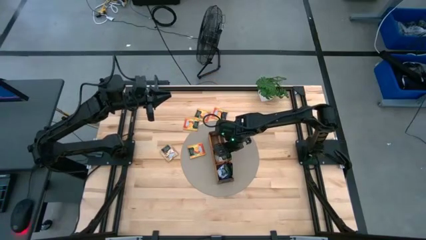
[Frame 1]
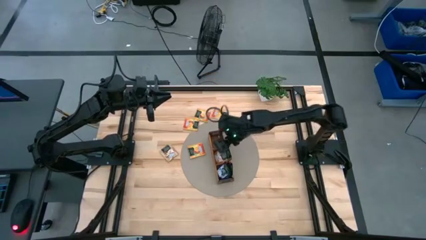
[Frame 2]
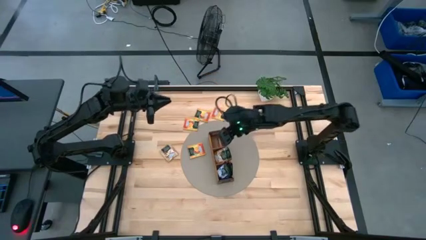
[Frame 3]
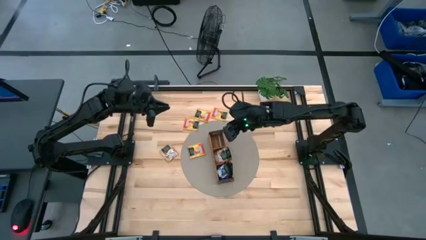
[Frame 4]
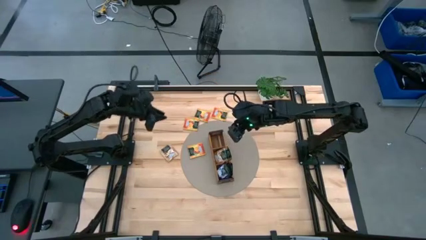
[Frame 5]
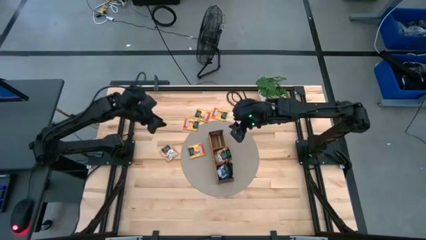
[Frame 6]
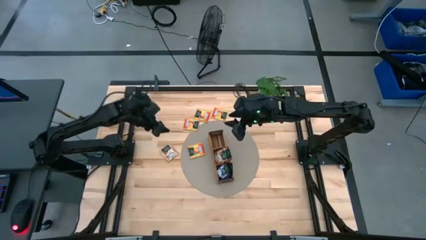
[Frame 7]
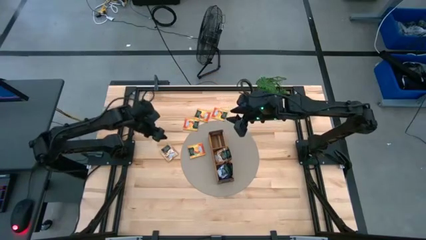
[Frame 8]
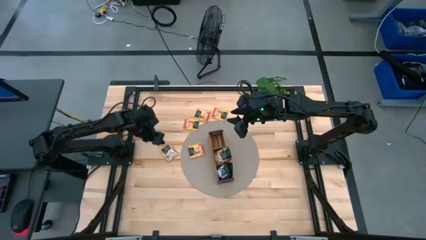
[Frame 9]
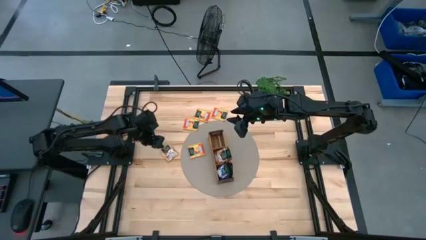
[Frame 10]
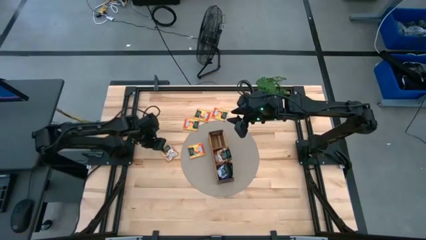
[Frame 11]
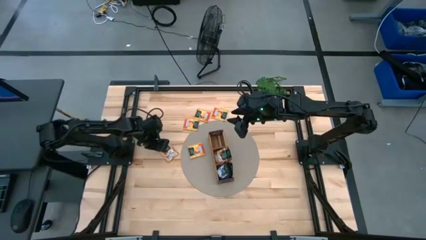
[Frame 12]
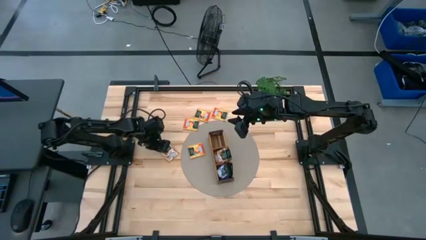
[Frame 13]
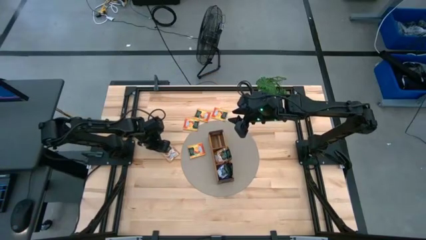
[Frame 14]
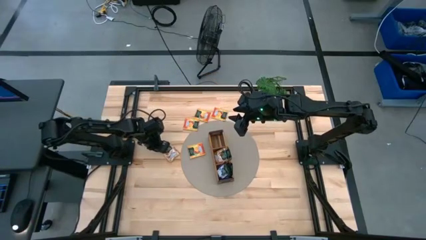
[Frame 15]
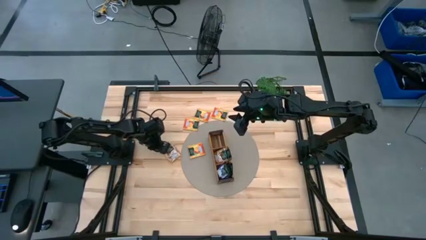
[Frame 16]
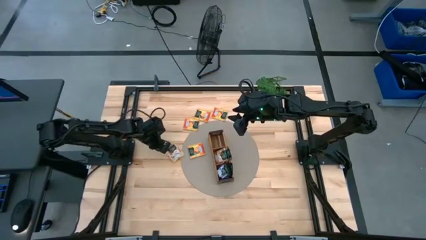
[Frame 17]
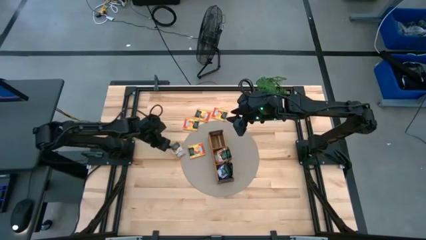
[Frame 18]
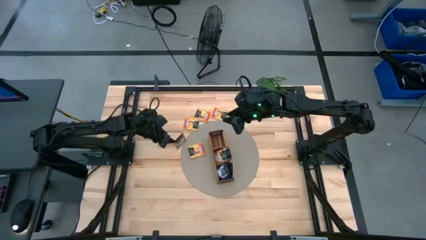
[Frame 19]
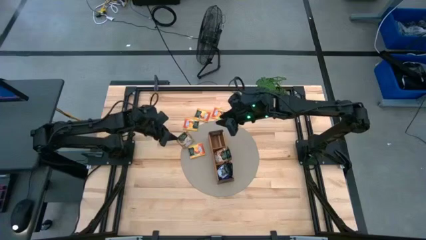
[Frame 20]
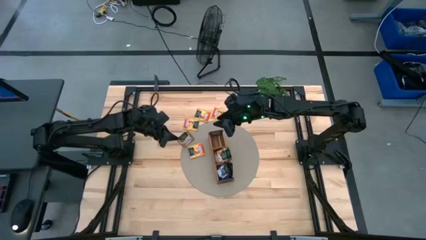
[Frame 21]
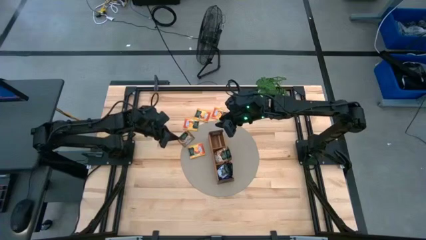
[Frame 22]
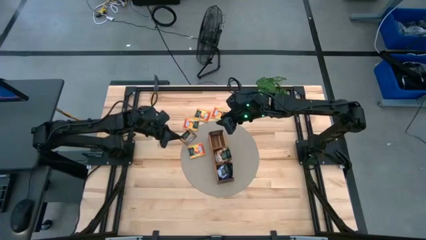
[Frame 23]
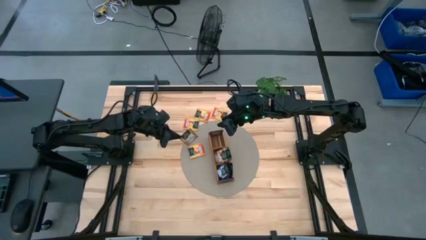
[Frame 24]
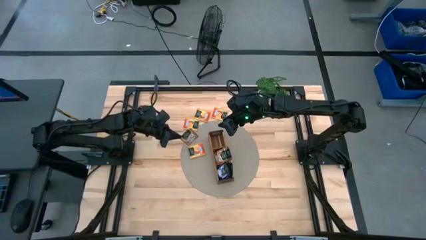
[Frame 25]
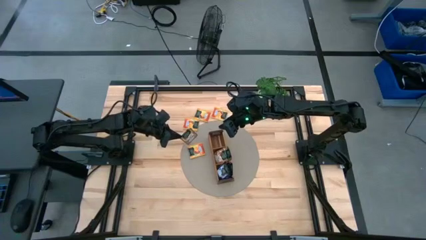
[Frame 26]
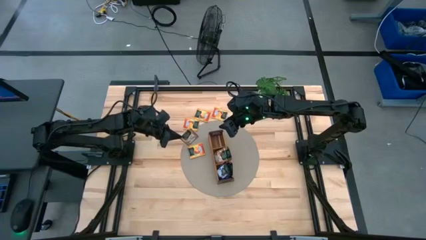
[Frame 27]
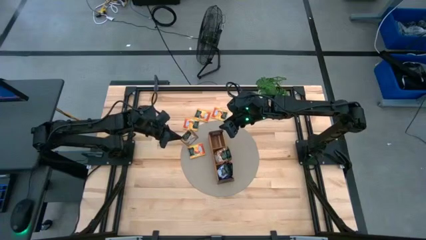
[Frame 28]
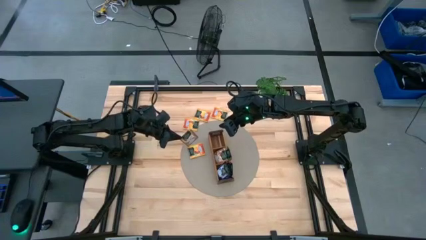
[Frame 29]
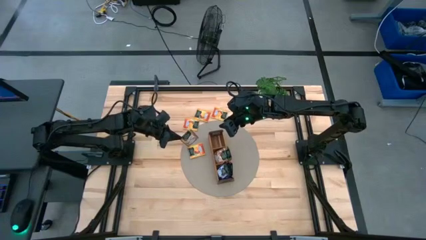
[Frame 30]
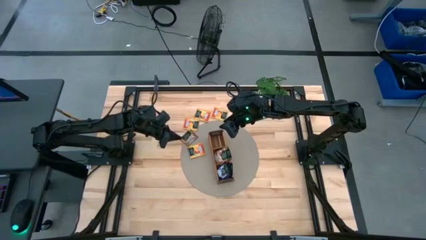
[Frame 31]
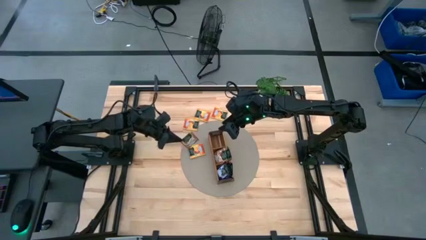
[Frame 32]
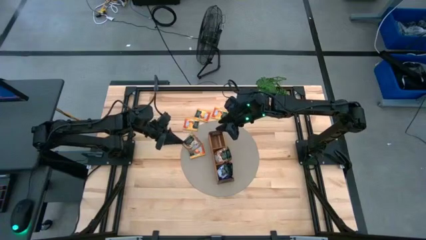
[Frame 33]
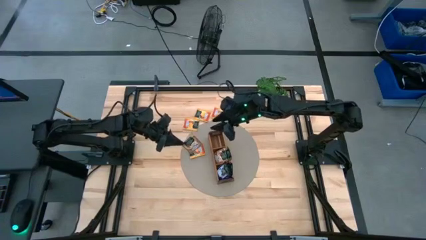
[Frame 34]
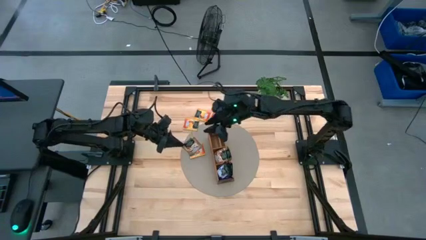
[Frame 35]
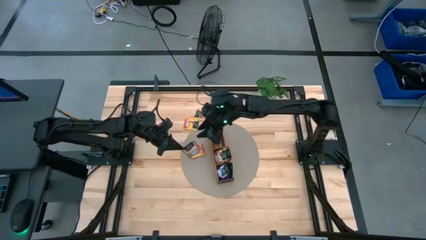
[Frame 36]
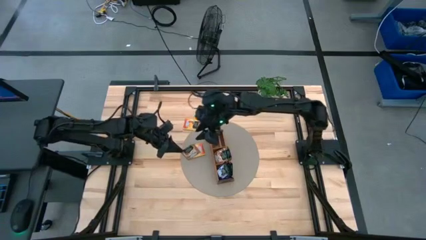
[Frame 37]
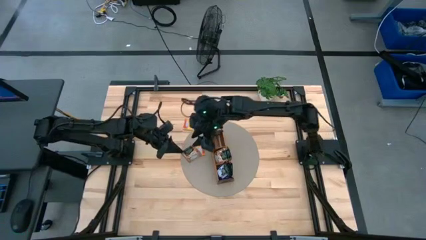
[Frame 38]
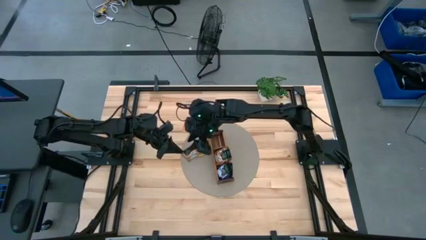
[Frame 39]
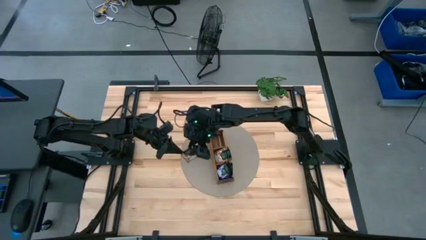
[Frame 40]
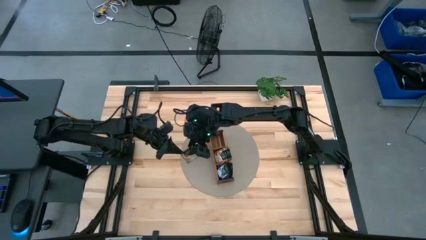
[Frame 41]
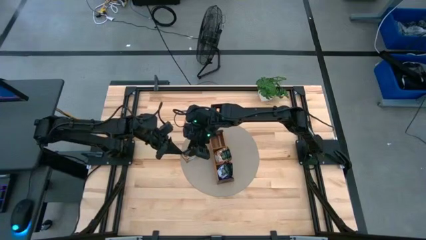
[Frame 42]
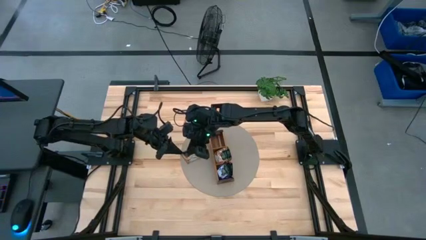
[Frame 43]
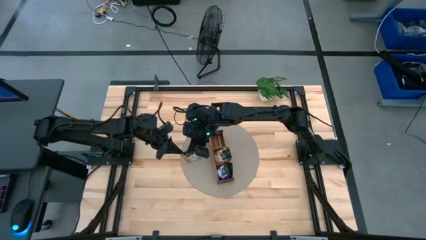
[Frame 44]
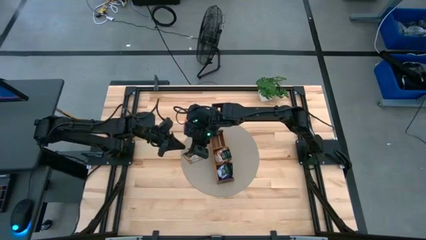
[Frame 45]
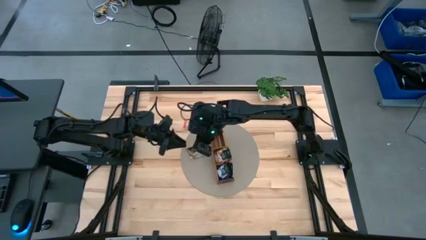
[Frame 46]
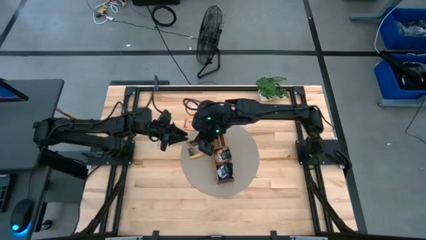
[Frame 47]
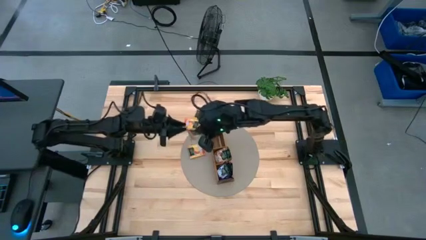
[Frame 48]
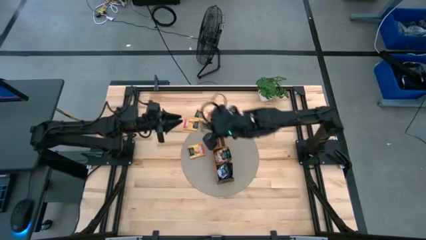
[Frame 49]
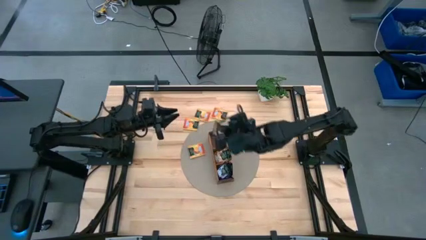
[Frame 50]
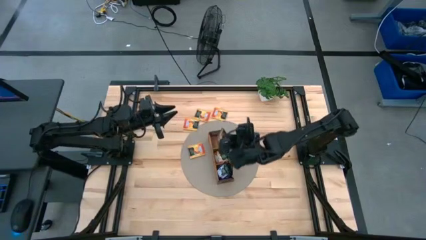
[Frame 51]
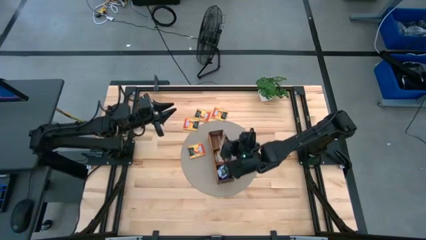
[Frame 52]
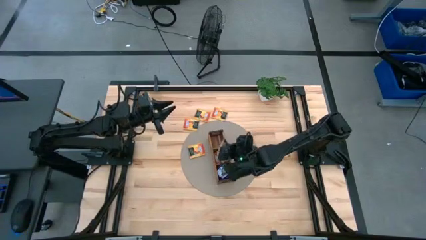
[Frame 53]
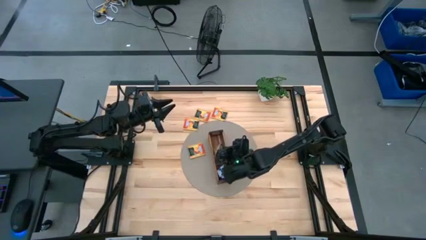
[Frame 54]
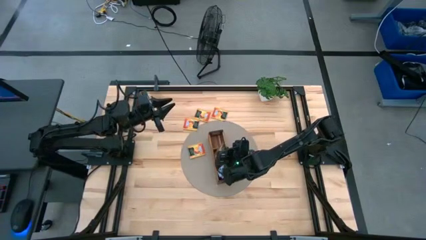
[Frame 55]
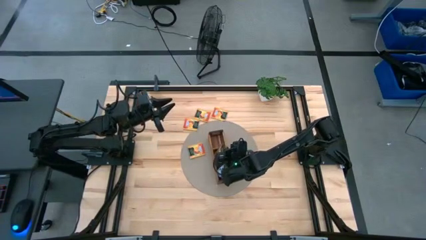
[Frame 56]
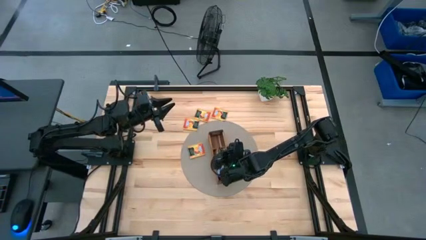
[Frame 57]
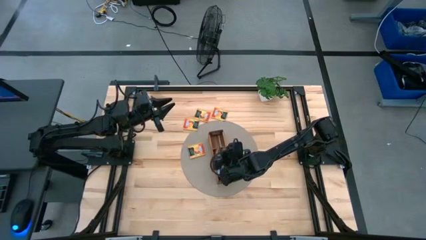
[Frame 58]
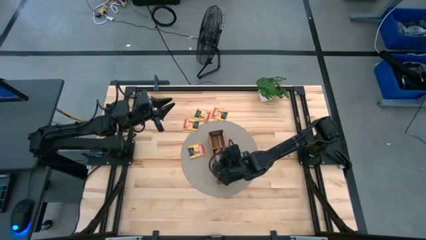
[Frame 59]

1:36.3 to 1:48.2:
Task: Pick & Place Tea
Put the brown tea bag into the middle section of the wooden organizer

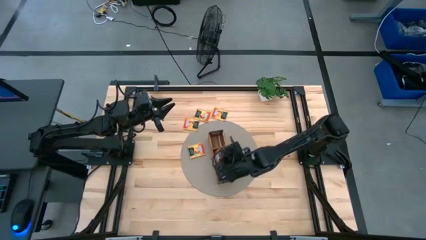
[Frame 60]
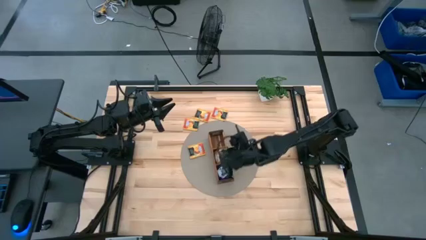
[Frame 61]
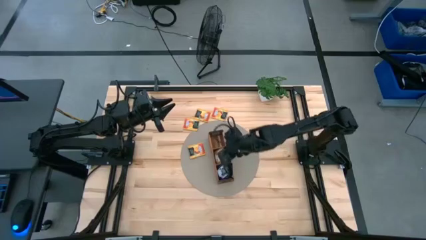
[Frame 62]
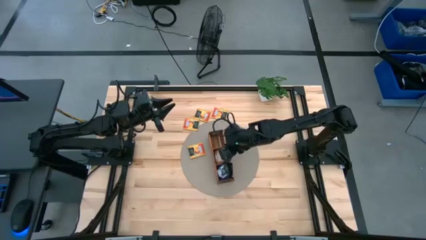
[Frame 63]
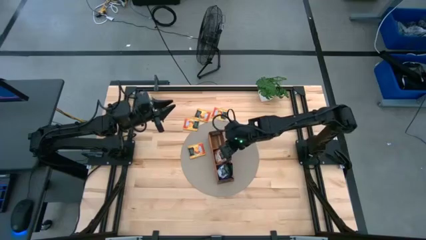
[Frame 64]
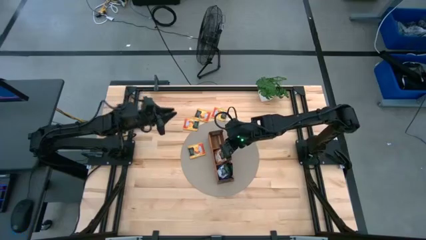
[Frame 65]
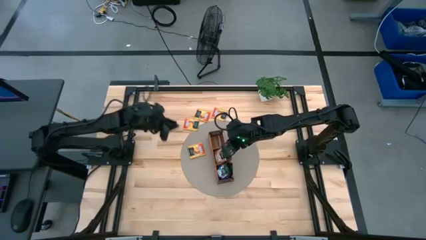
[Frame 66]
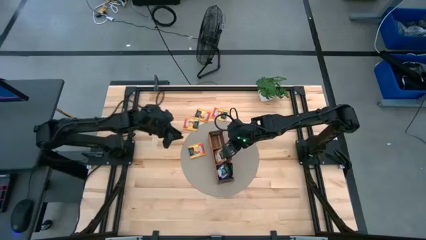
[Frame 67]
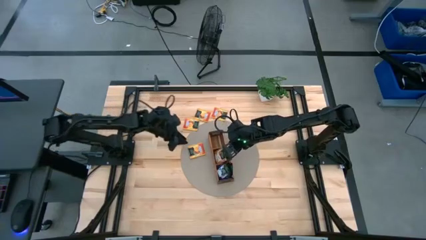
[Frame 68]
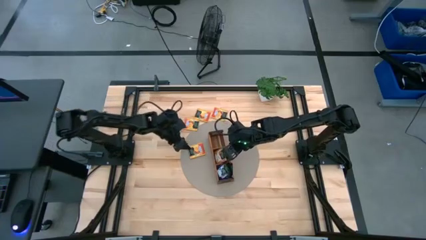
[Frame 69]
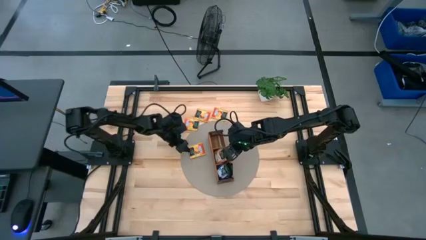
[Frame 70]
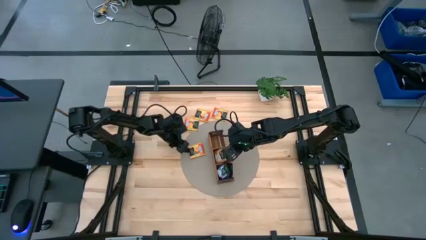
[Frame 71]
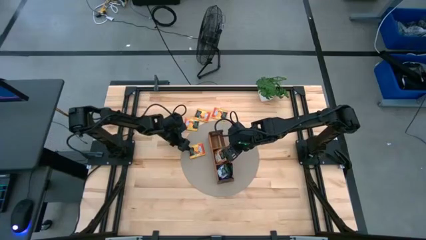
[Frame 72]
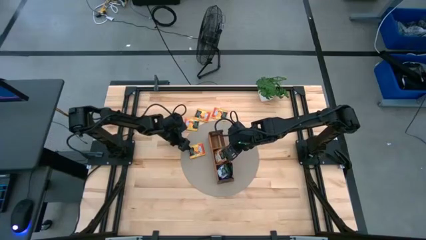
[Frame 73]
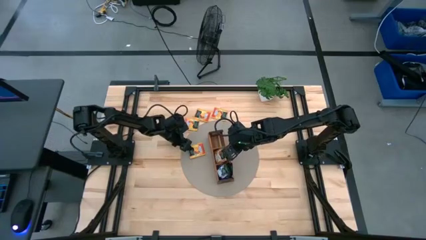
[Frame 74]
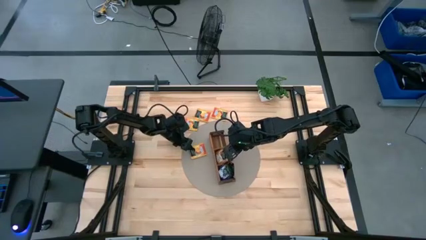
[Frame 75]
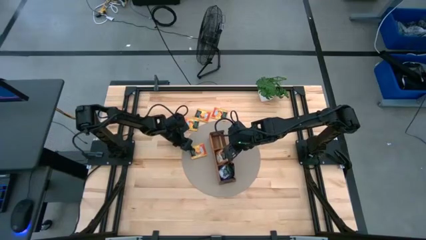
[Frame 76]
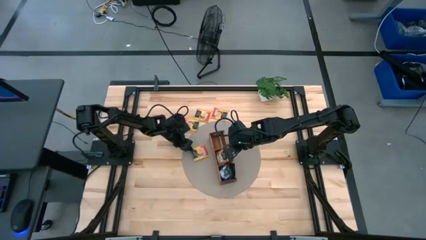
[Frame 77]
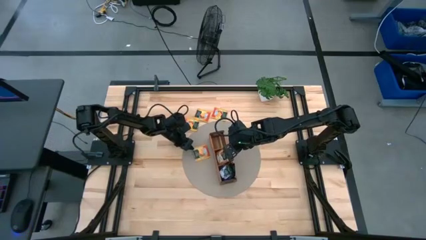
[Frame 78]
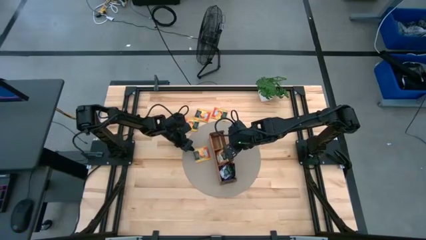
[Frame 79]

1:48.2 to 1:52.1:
Put the orange tea bag into the left section of the wooden organizer

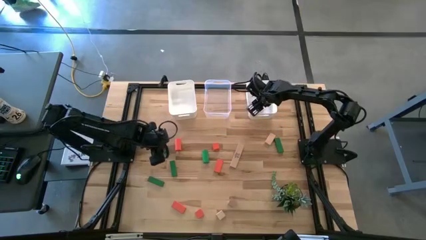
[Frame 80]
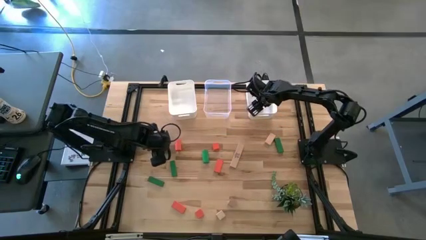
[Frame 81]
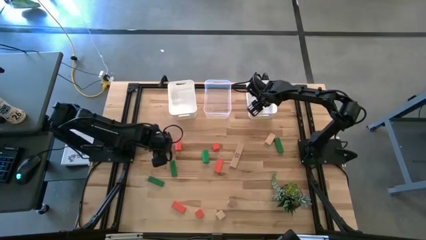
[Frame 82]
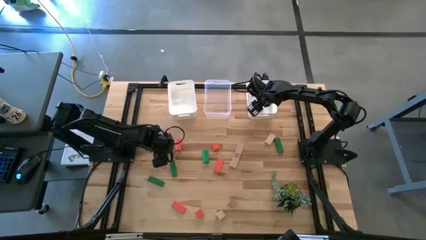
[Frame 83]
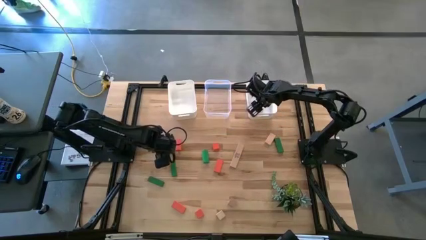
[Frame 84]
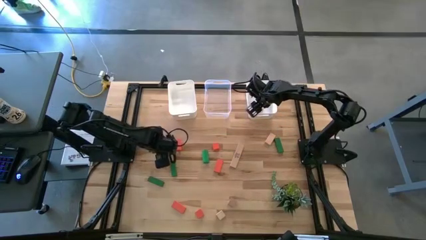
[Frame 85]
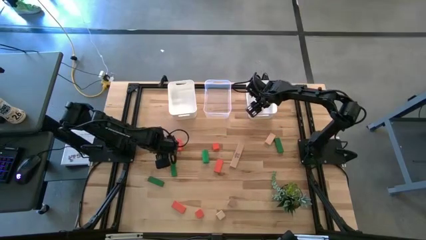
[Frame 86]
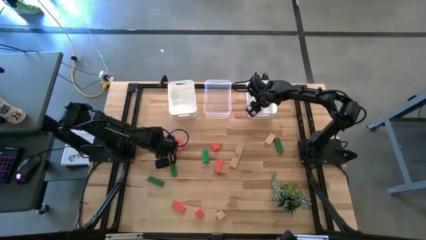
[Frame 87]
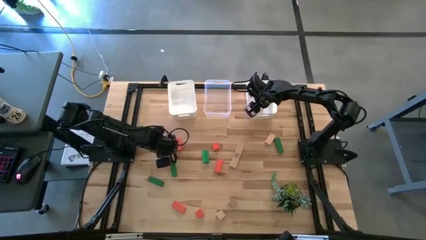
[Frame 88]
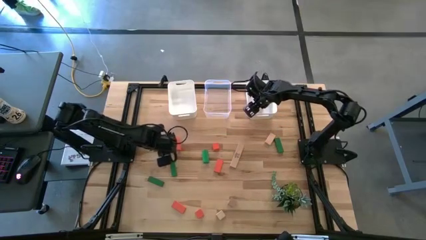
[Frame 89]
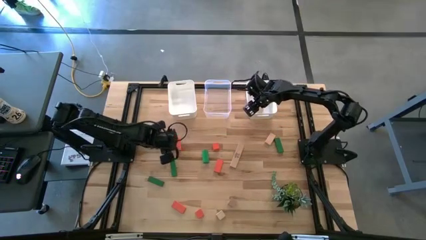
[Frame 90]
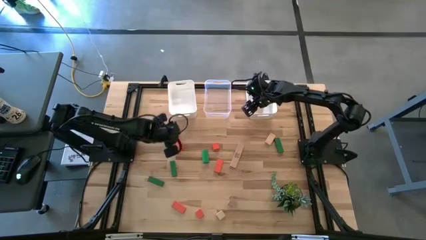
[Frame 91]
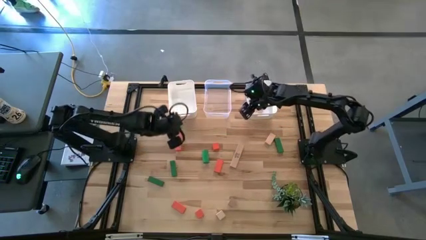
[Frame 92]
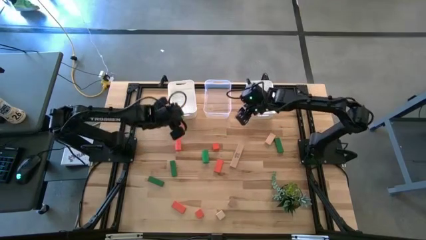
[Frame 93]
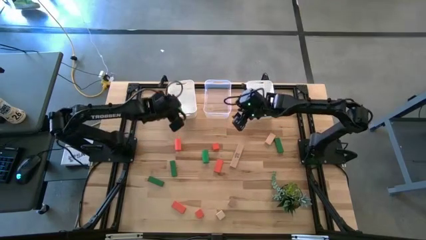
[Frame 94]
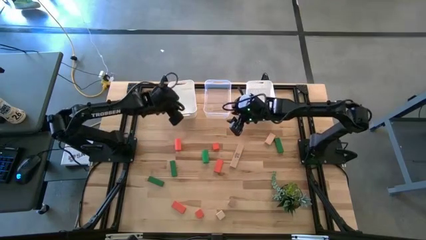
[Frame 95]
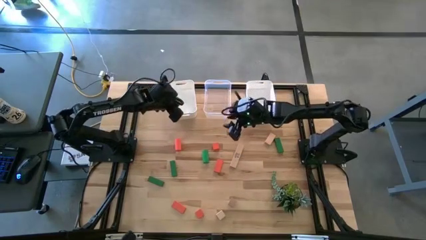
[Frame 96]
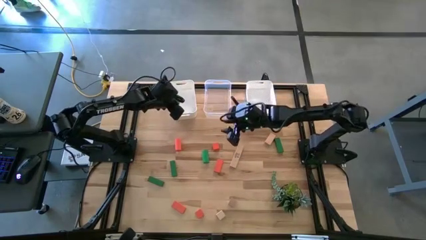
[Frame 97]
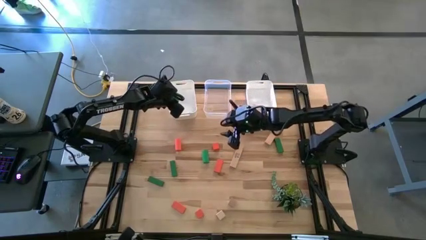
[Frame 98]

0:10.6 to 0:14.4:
Task: Sort & place blocks by color
Put the green block into the left white bin
